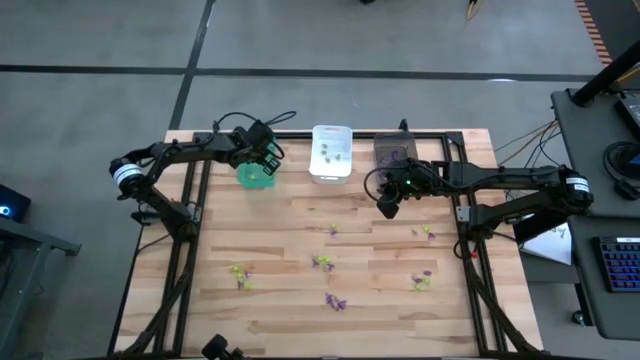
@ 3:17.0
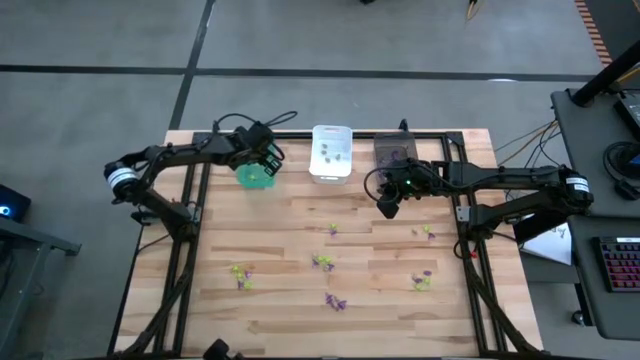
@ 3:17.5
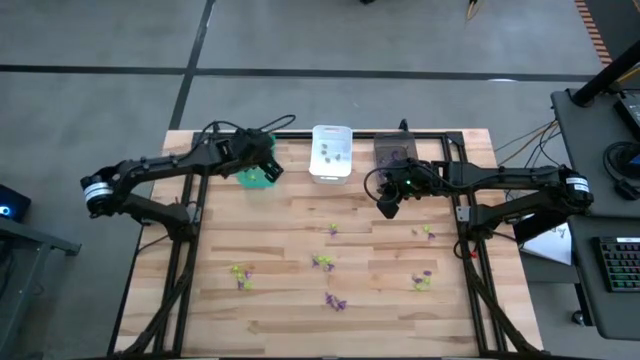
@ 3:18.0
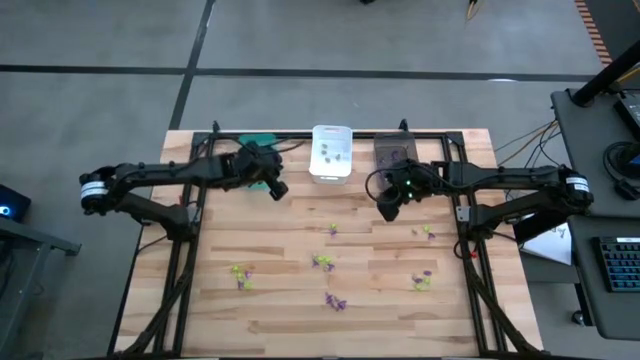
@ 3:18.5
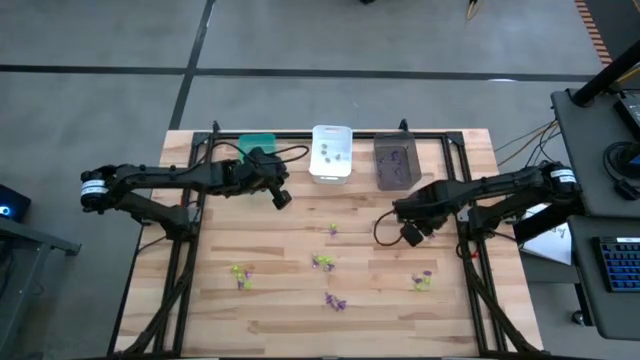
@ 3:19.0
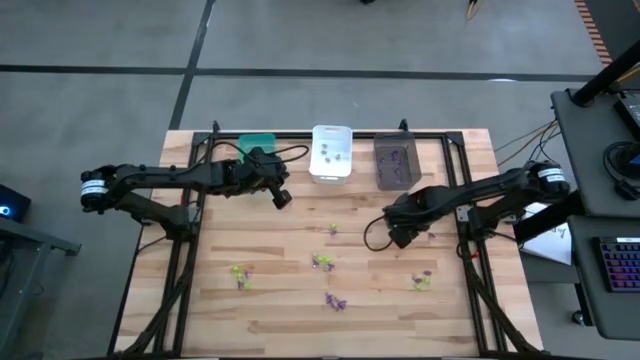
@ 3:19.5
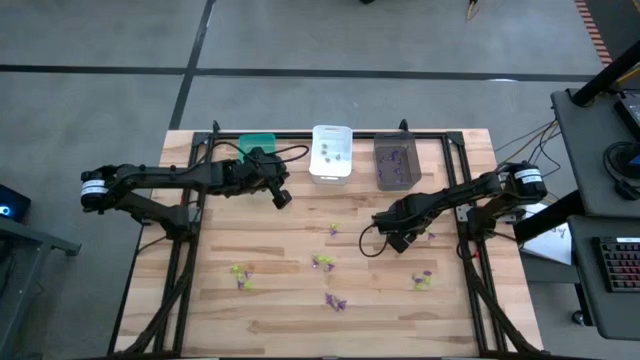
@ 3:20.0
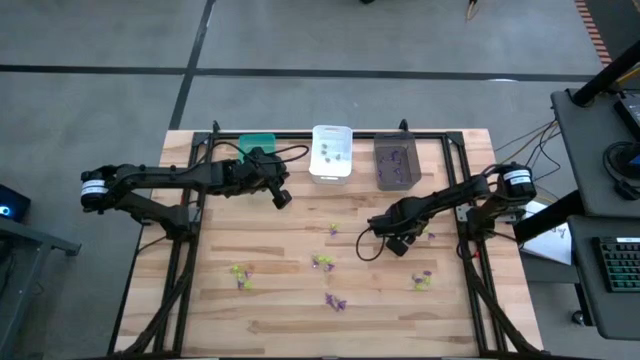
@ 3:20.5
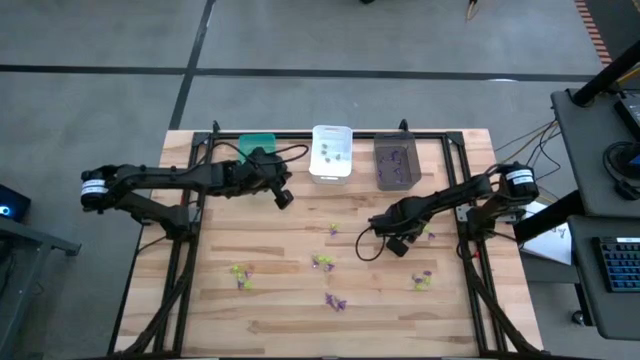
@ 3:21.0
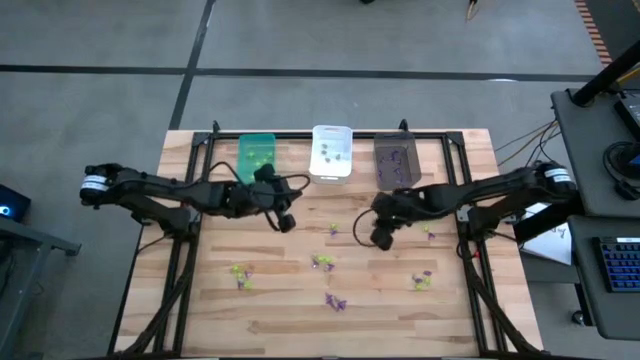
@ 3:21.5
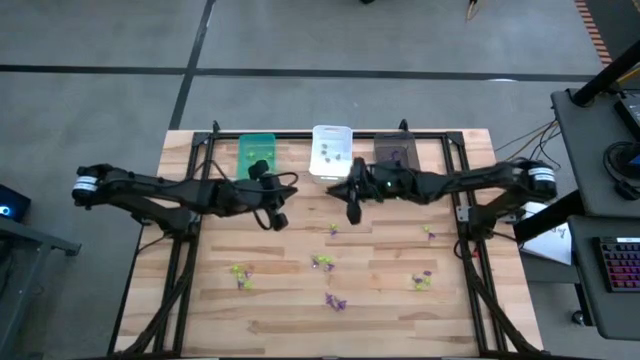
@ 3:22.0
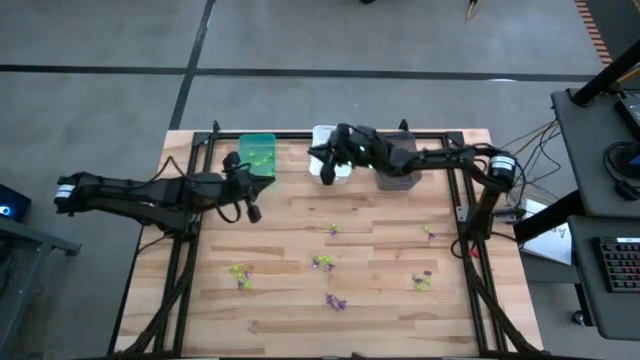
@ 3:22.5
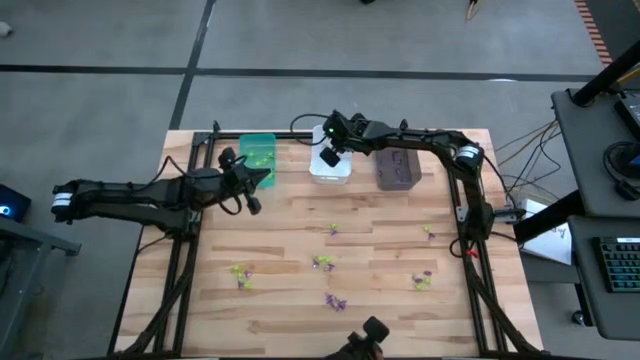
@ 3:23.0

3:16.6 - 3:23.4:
Task: Sort Halloween decoration
Put the white skull toy into the white bin

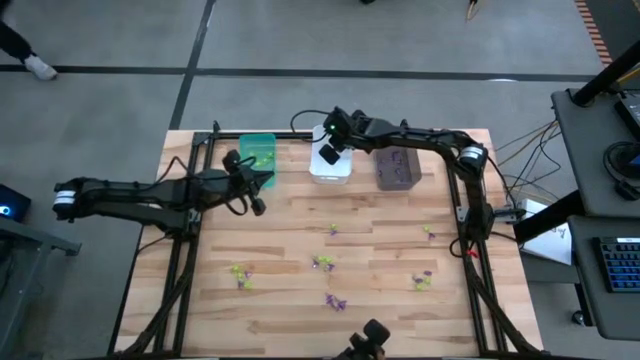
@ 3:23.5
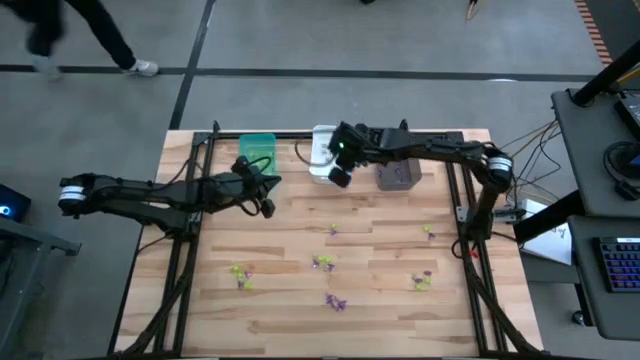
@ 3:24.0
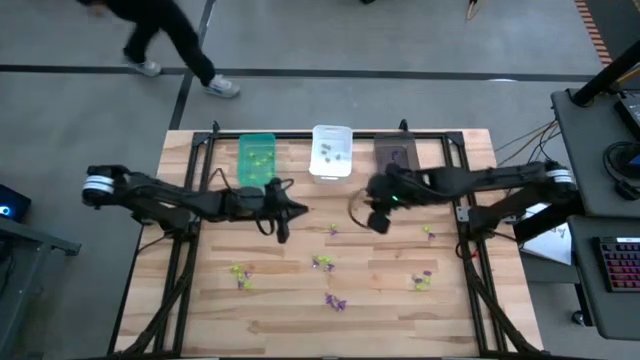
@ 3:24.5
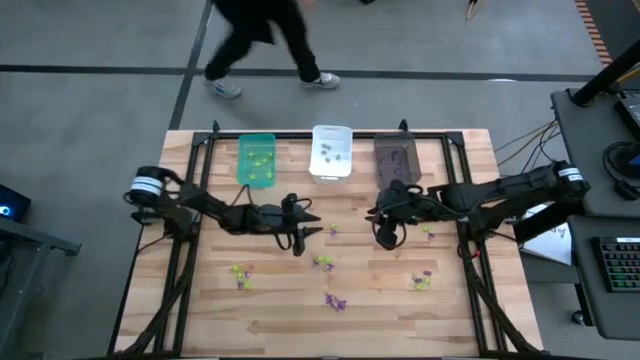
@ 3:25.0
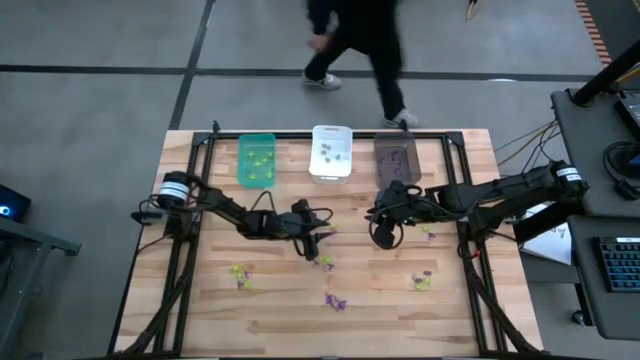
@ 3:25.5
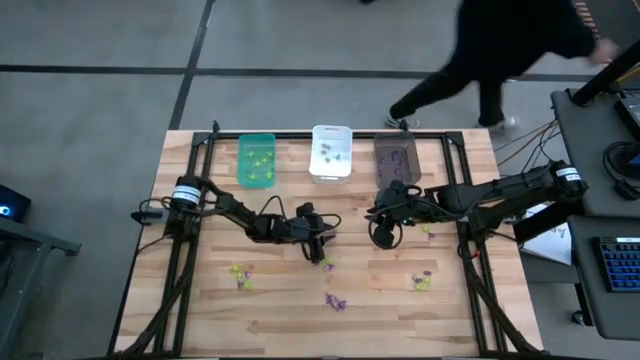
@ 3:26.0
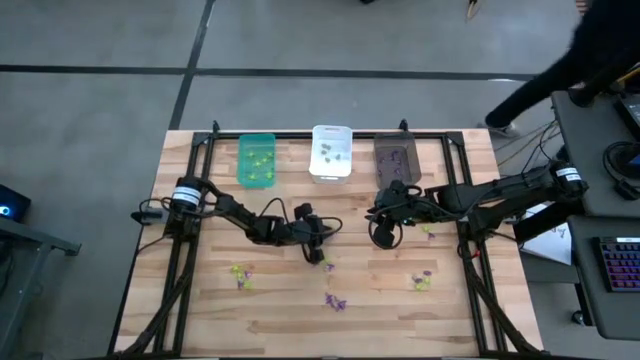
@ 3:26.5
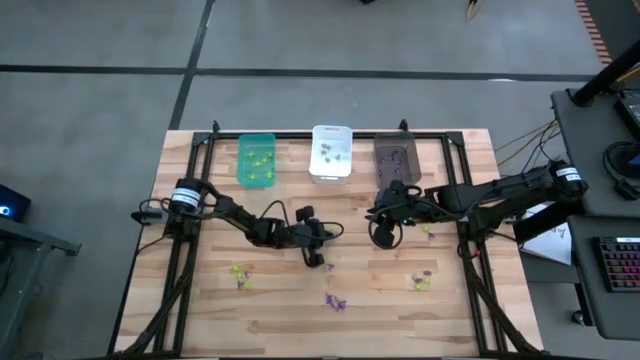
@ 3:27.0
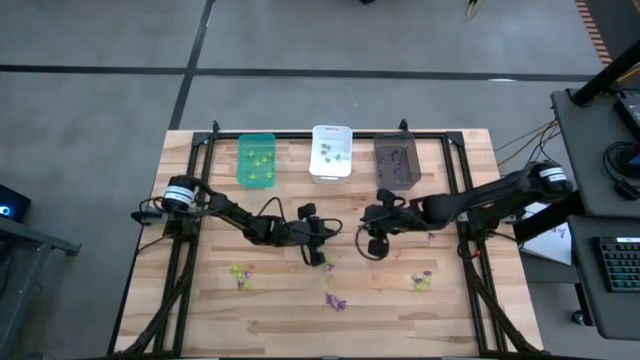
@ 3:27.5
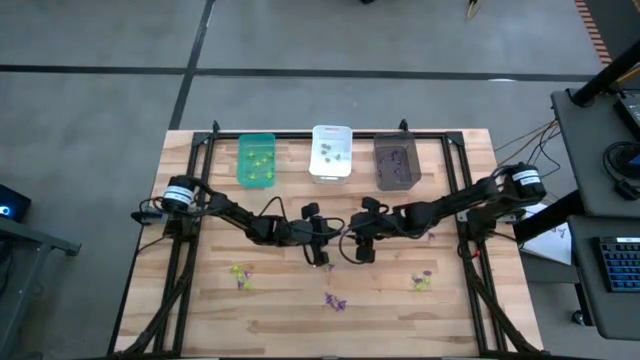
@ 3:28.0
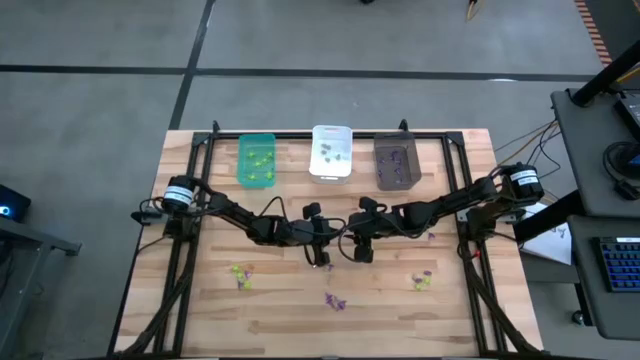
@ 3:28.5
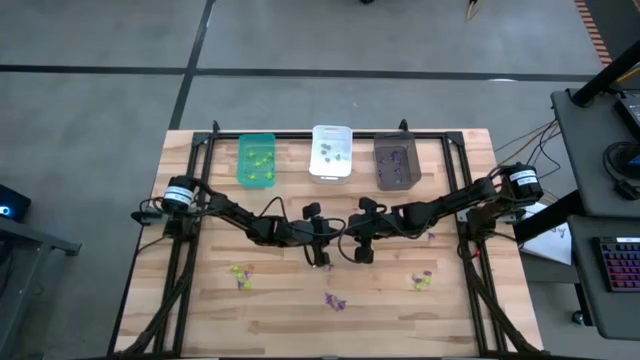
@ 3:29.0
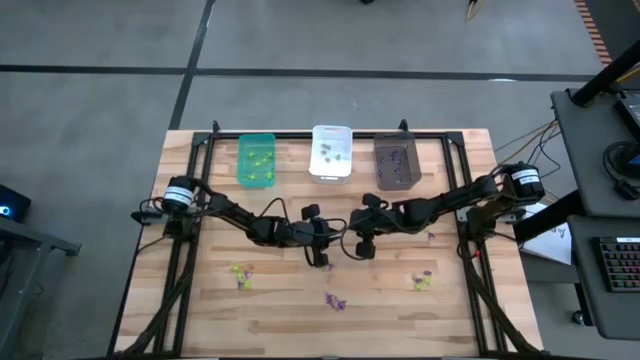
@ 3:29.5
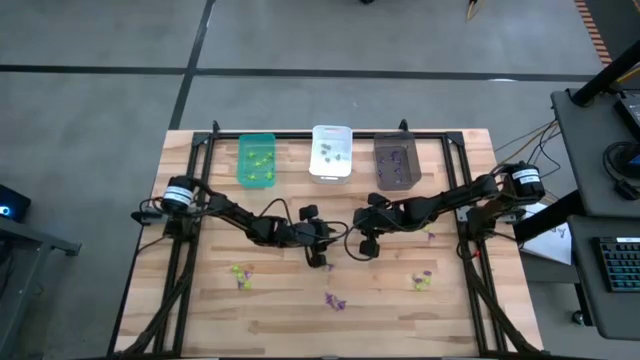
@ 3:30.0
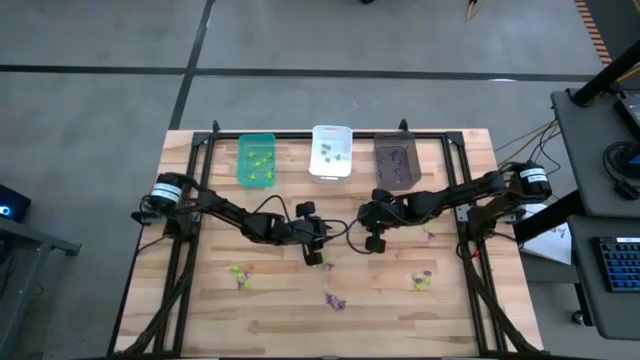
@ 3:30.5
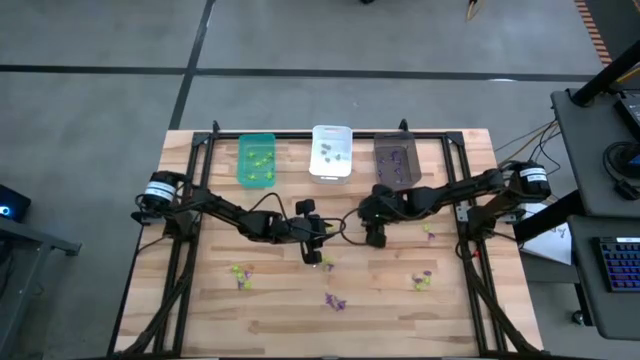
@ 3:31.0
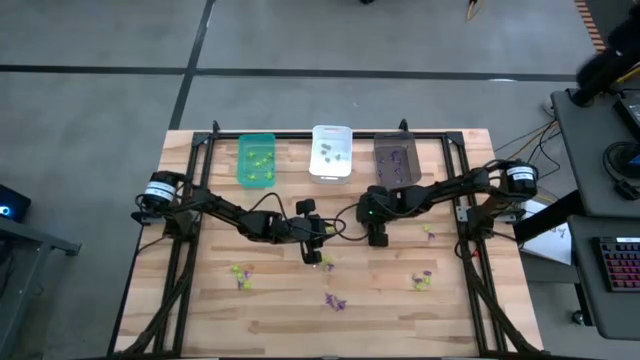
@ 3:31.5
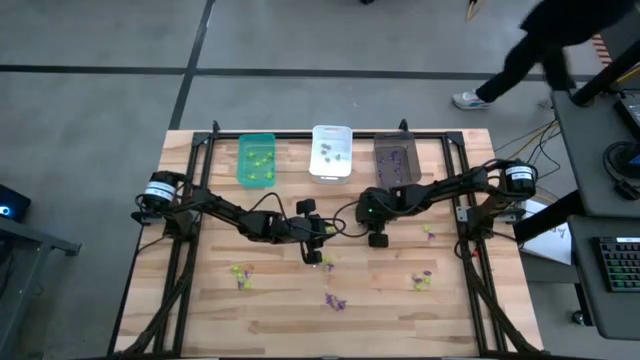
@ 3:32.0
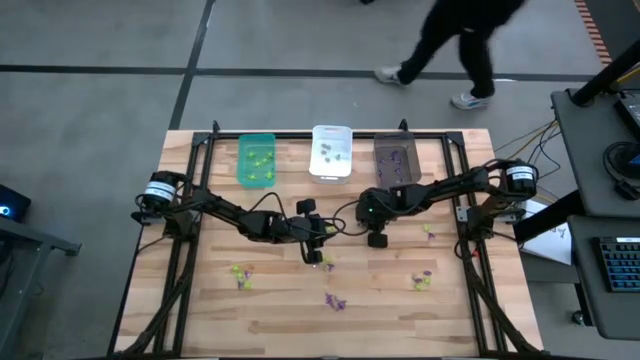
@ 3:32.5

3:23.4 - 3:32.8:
Put the purple witch hat toy into the gray bin

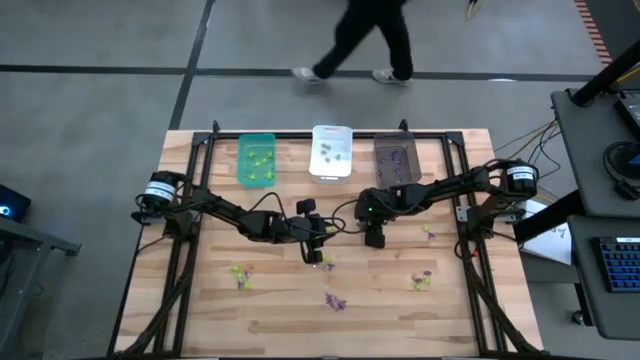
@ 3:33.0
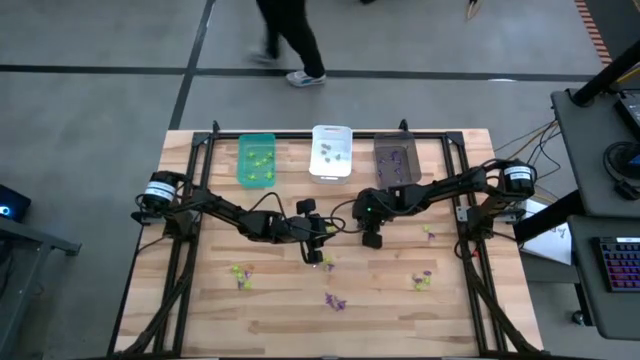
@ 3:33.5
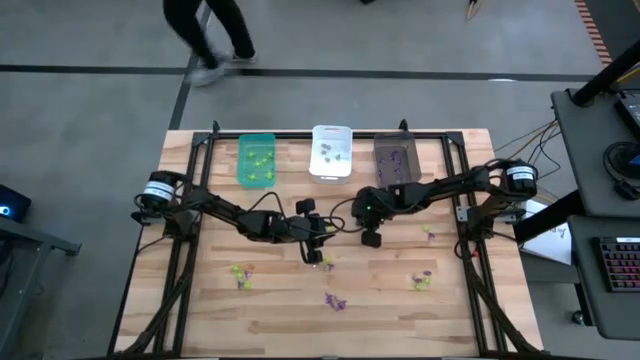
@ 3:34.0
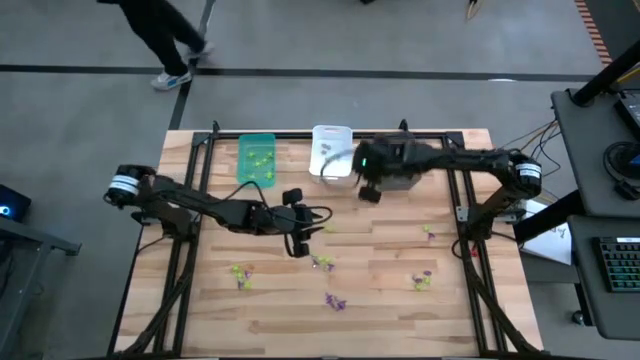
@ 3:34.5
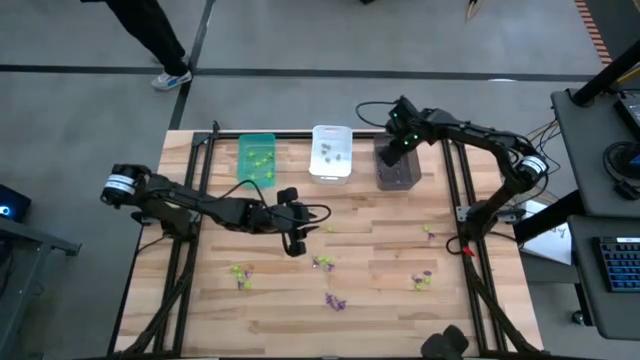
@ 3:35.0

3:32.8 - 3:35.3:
Put the purple witch hat toy into the gray bin
